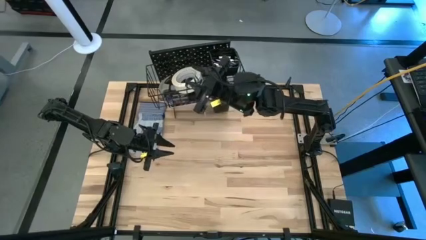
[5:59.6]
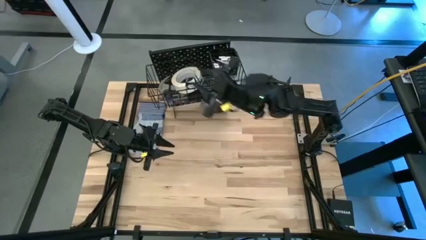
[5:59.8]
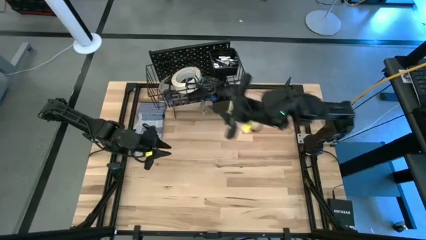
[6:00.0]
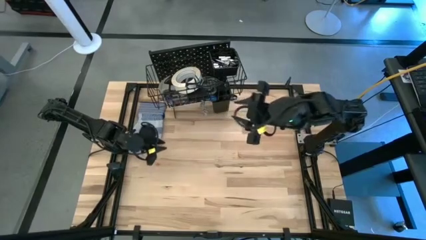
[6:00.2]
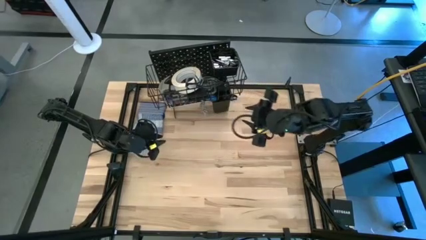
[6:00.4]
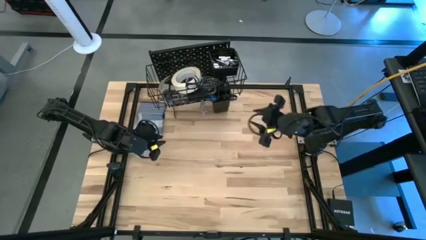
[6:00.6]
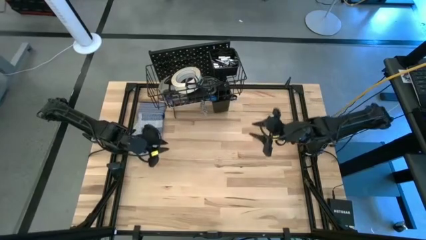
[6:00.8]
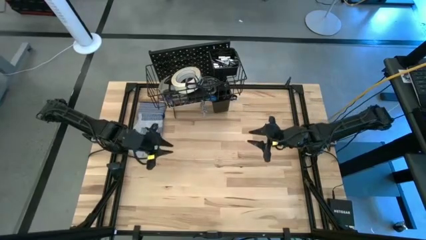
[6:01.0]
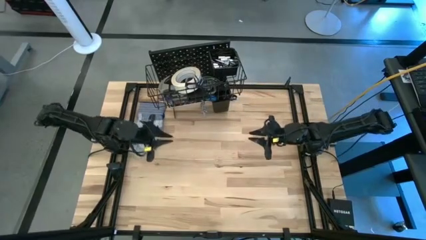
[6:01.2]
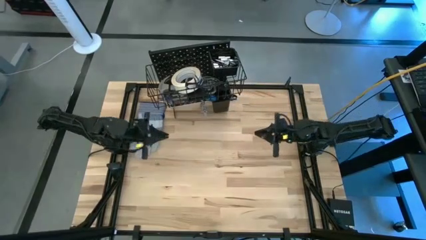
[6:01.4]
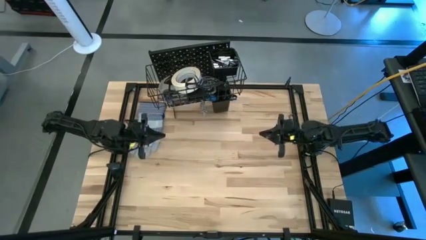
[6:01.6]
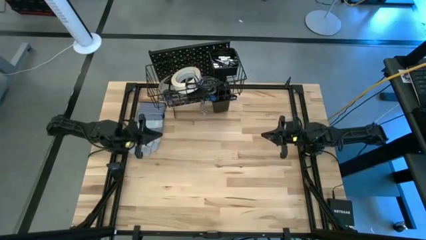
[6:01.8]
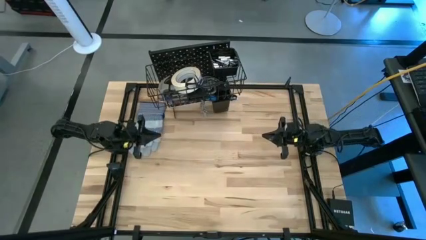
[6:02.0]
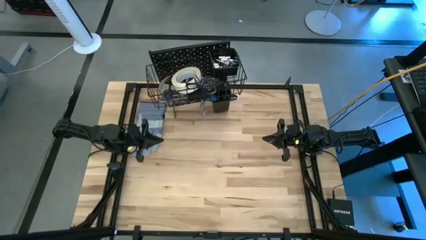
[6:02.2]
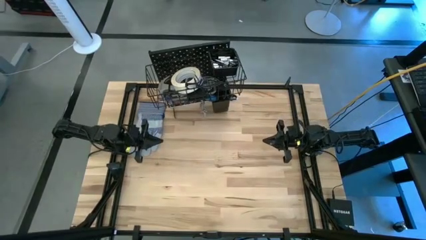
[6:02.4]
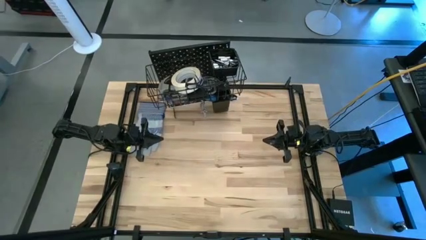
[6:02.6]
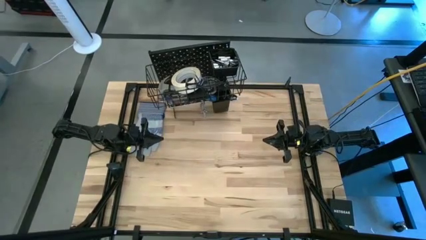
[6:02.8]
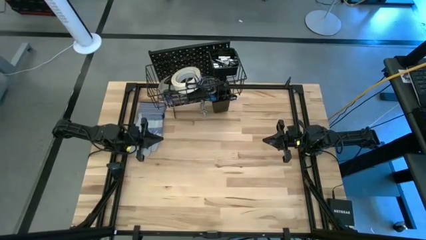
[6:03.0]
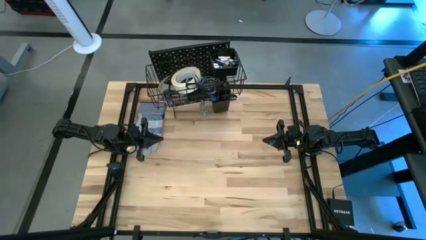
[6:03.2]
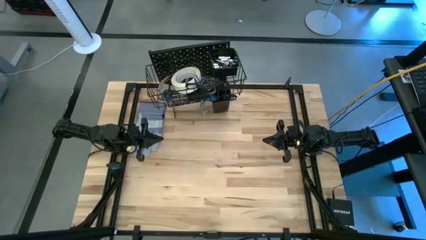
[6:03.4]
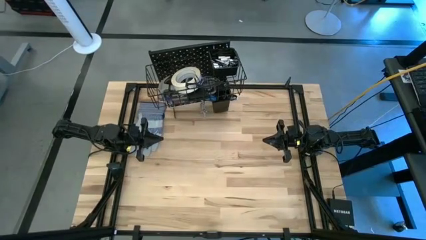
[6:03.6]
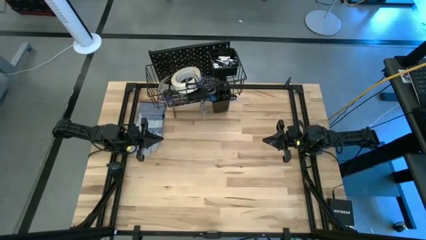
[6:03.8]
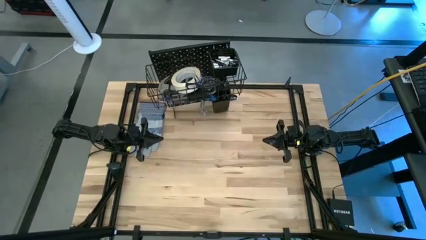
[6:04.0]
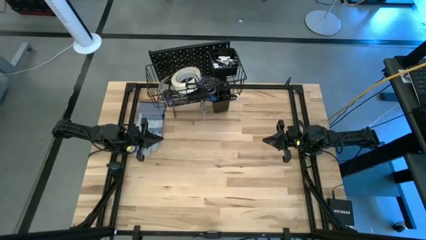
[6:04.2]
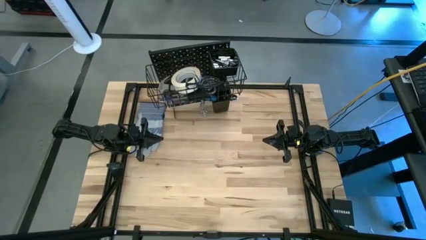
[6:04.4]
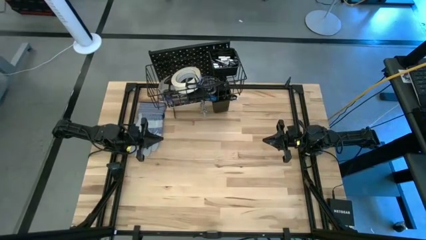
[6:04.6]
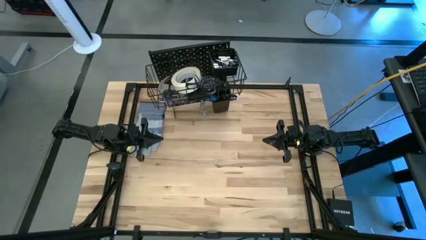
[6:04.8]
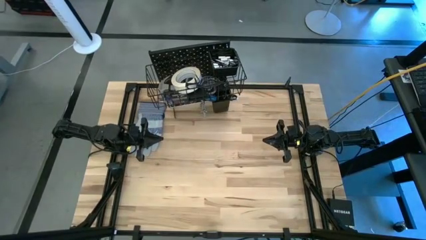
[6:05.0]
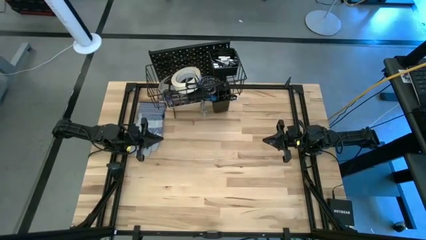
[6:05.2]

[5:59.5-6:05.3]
Task: Hang tools onto peg board
Return to Home Position

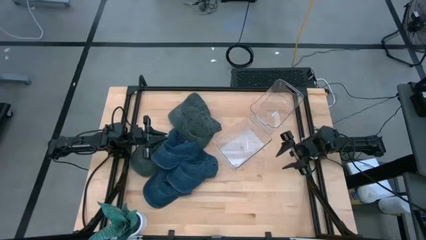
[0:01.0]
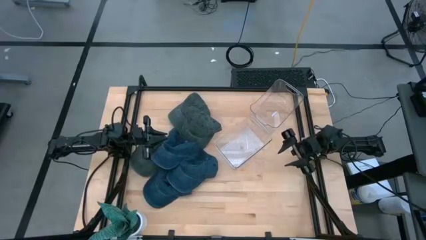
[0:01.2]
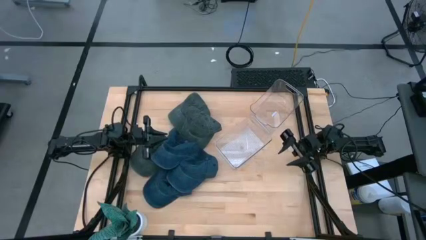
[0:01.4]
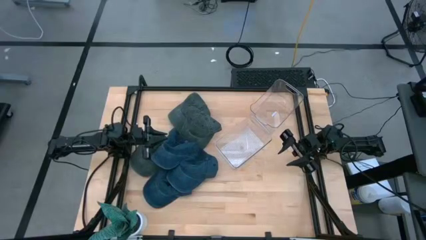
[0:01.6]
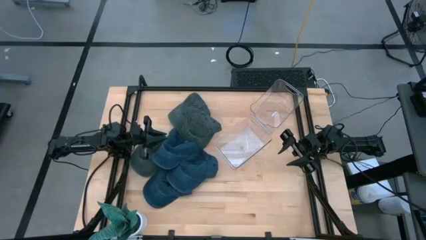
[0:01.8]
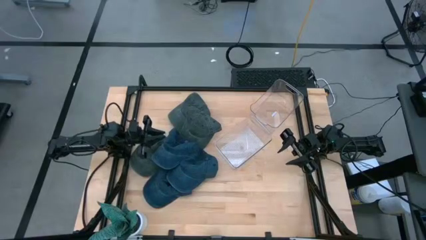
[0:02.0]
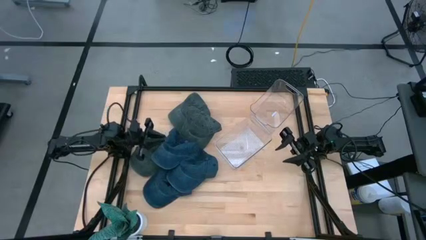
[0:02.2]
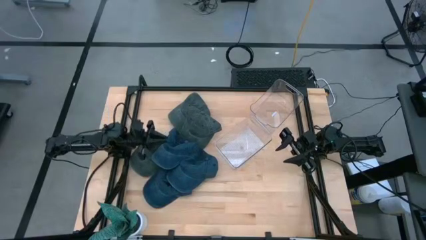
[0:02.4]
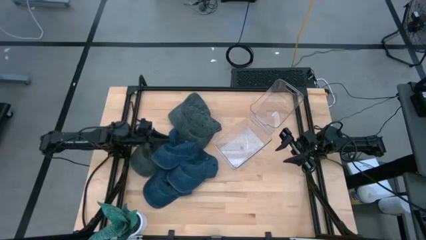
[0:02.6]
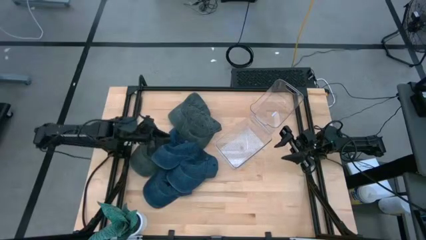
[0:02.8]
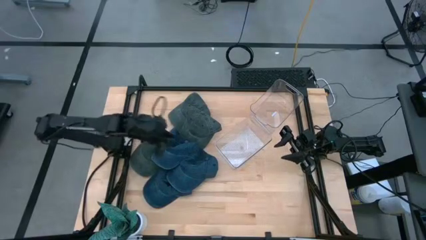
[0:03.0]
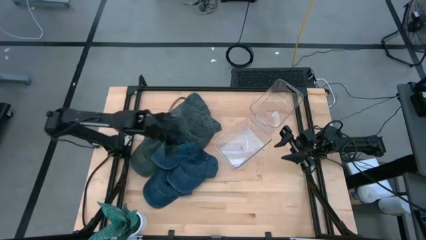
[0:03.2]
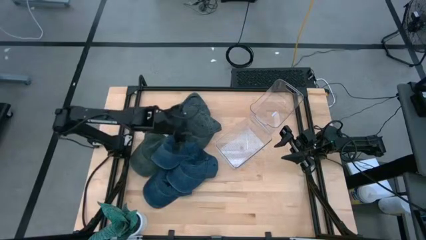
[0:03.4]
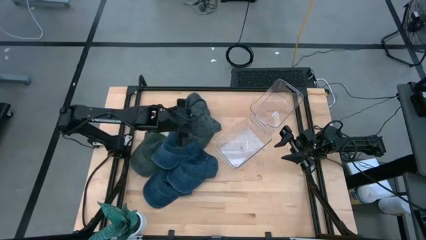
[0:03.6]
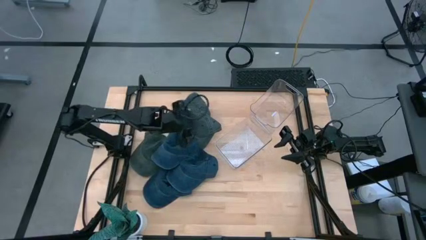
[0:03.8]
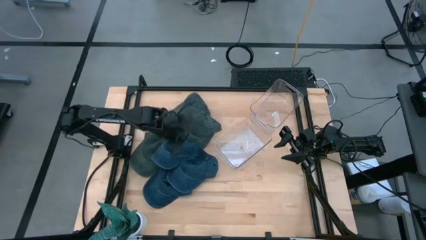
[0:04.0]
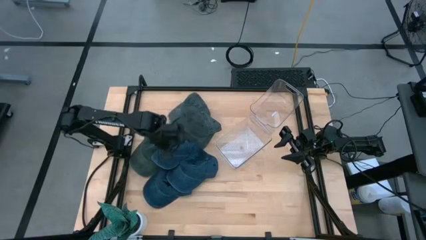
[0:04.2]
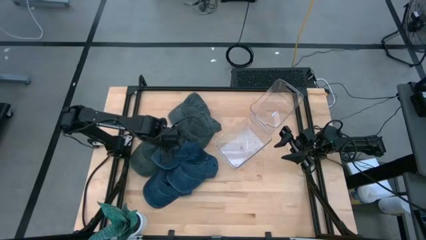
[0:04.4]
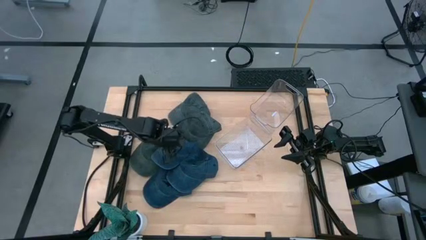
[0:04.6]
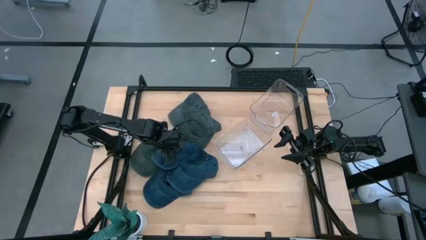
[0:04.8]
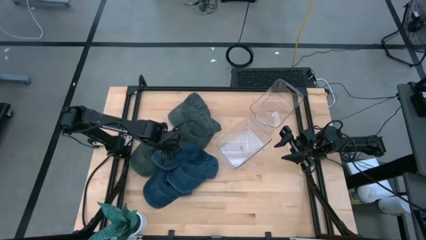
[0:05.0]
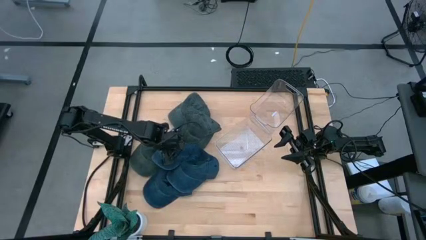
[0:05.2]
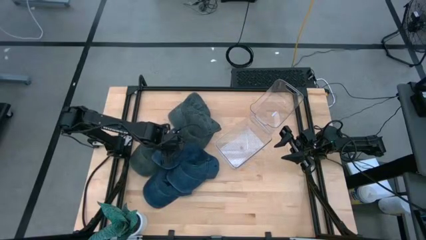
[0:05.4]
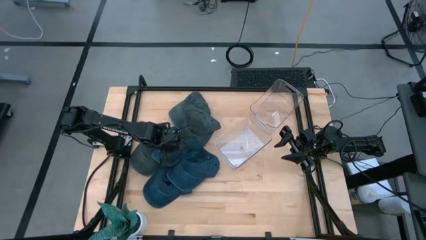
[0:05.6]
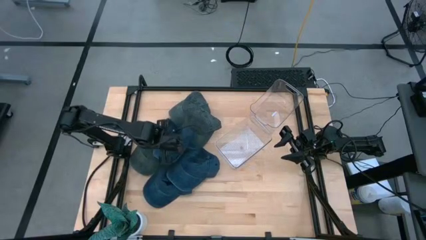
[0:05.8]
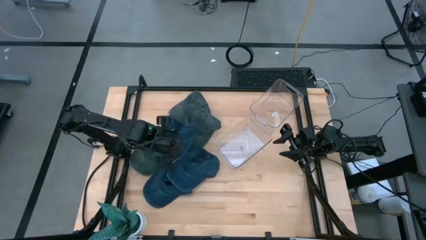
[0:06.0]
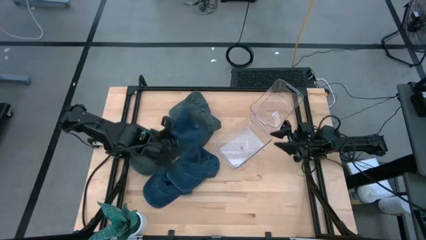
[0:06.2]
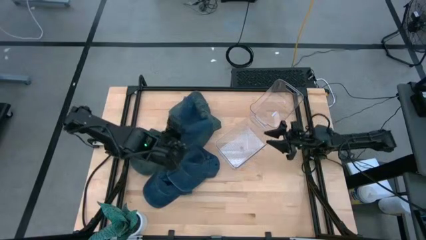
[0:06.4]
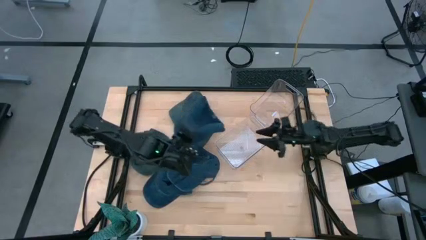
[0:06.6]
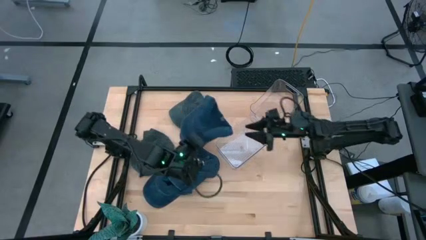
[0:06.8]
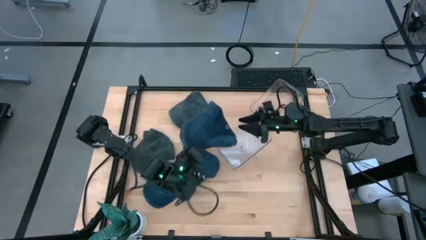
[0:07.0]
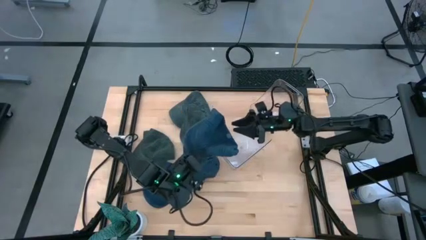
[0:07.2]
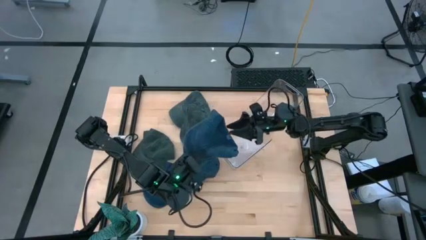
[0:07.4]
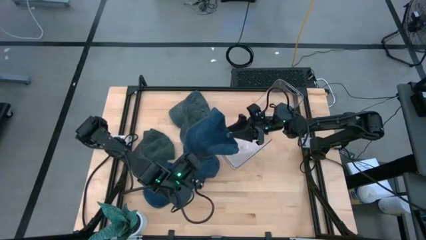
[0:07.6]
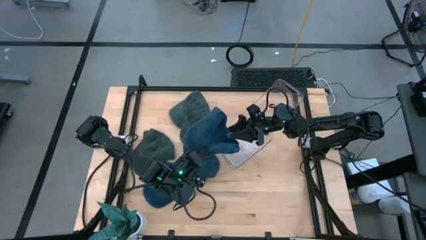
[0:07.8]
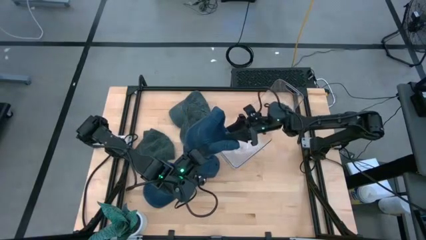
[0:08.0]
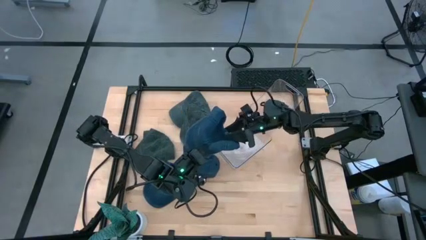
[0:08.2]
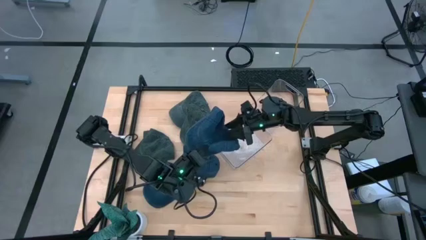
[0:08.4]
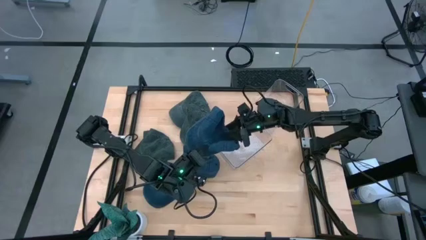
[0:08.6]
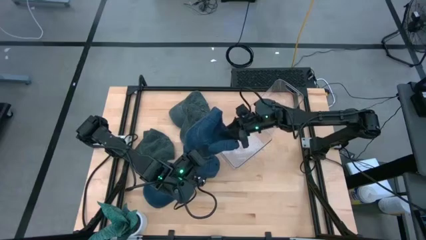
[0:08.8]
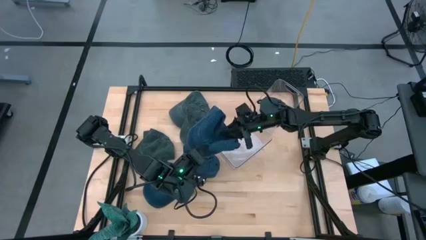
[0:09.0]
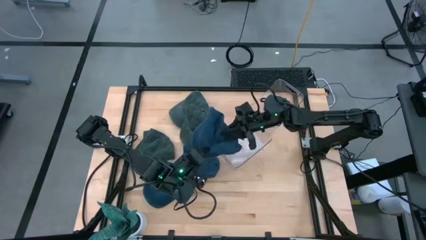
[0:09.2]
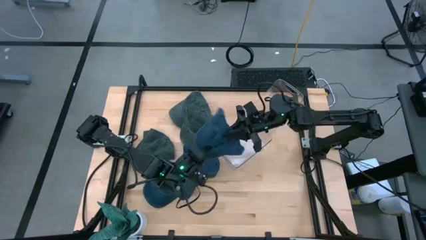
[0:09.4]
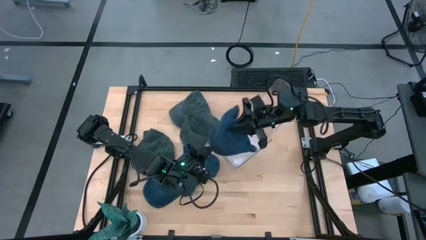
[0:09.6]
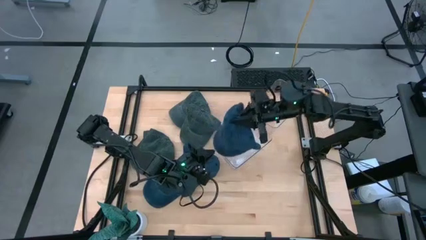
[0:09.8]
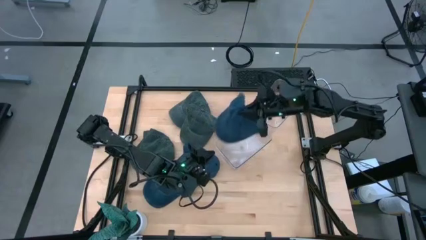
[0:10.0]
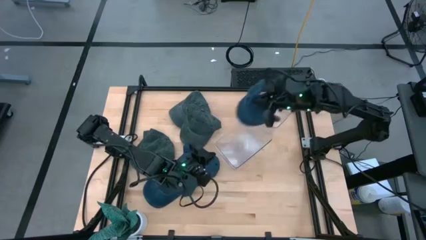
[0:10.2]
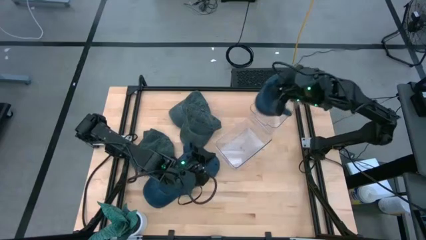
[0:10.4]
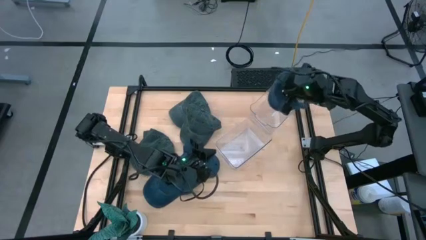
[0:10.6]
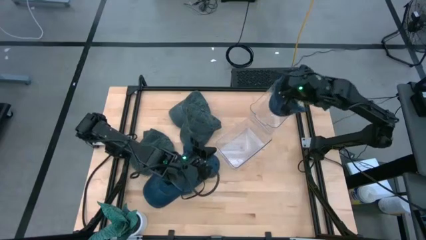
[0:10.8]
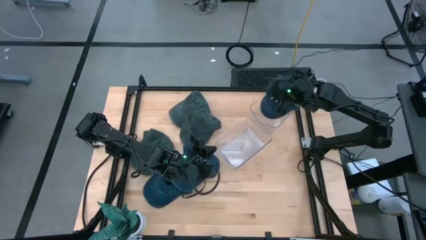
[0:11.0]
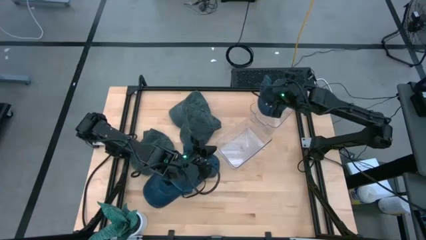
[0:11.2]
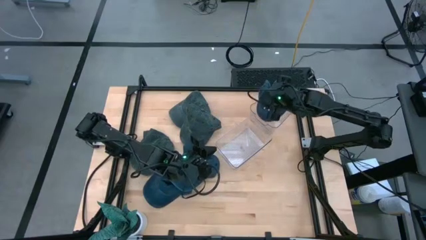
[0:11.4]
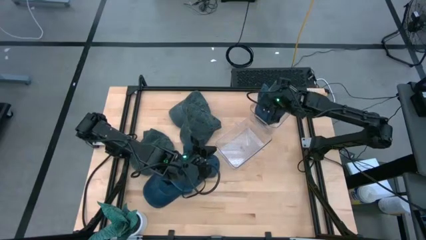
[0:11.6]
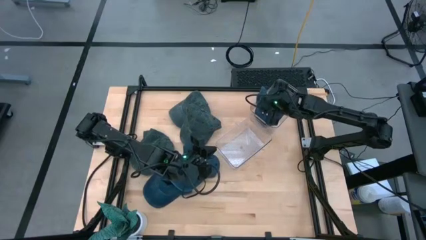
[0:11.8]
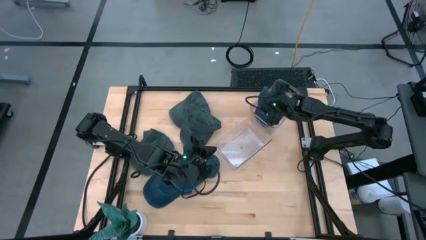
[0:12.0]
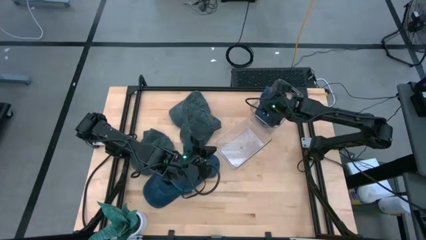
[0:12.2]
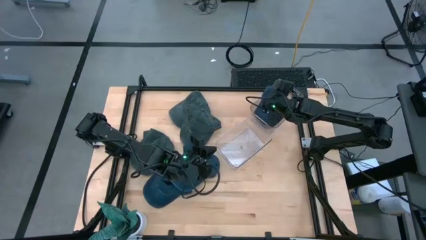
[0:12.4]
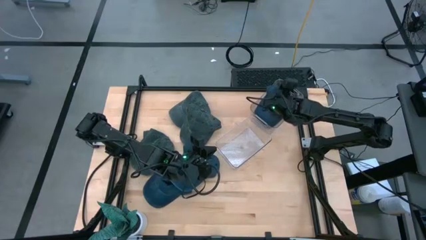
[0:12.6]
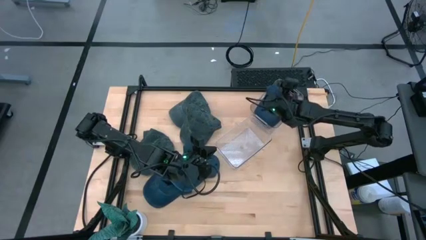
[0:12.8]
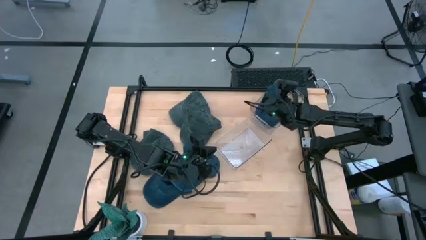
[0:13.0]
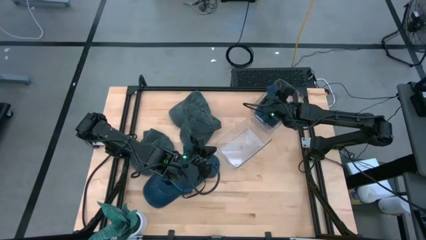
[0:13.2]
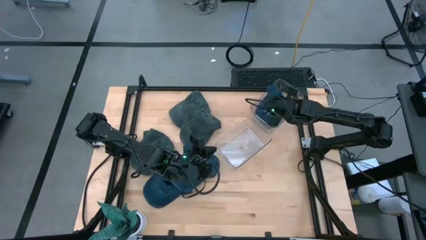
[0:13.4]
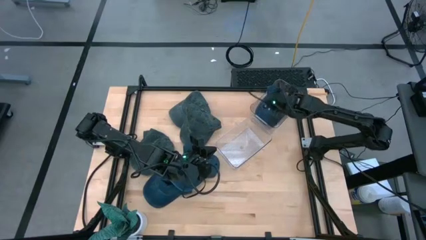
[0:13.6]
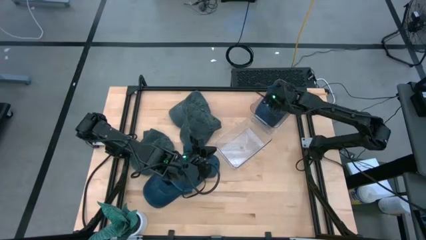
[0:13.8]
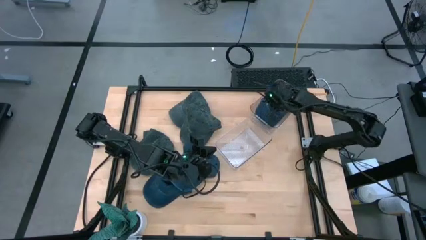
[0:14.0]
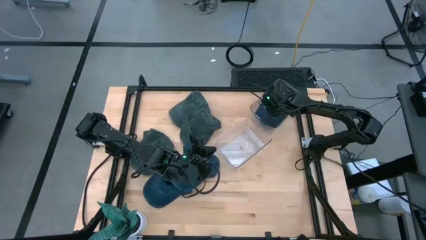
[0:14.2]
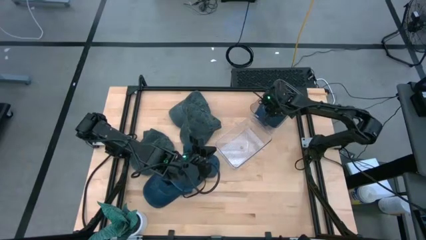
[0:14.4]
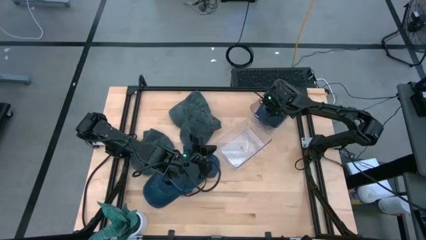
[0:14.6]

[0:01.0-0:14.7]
Task: Pick & Place hat
Put the top blue cap into the top transparent bin
